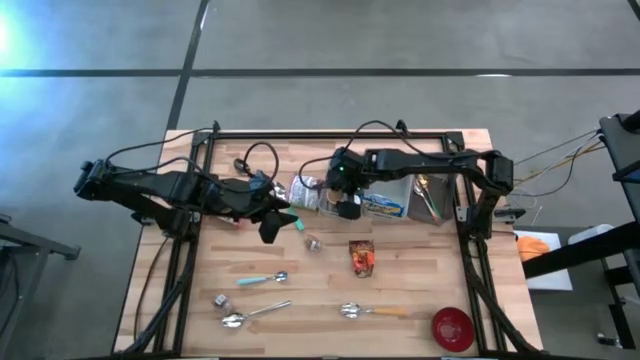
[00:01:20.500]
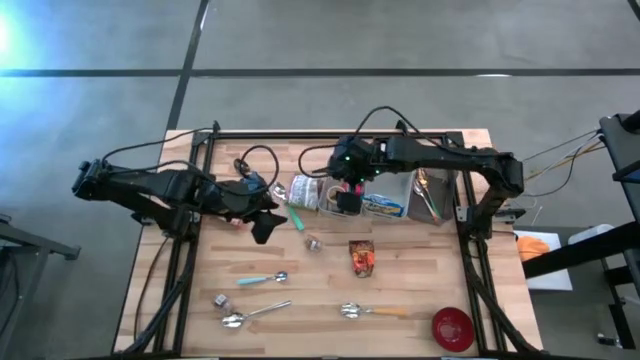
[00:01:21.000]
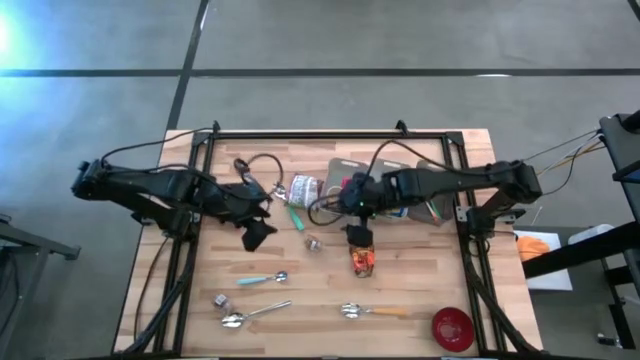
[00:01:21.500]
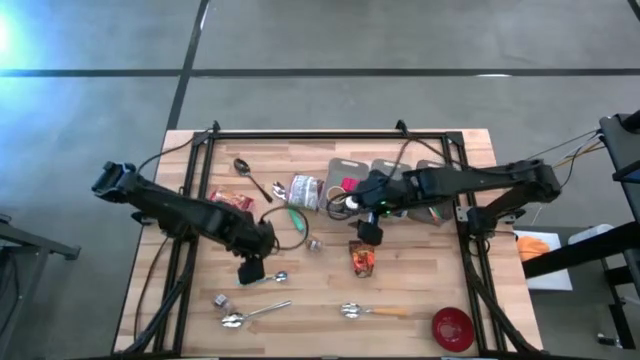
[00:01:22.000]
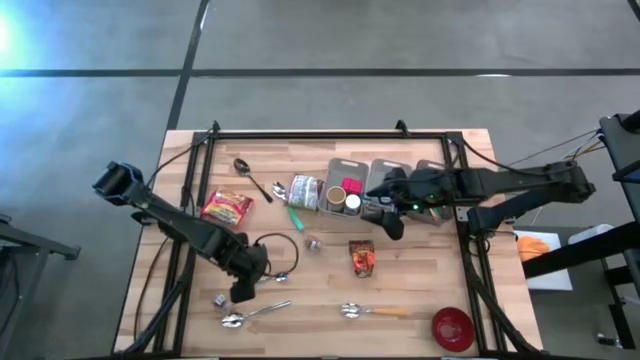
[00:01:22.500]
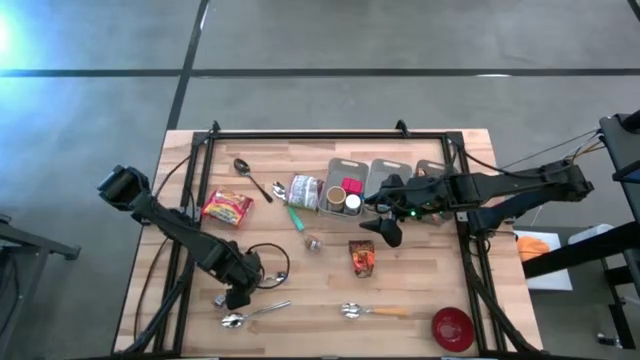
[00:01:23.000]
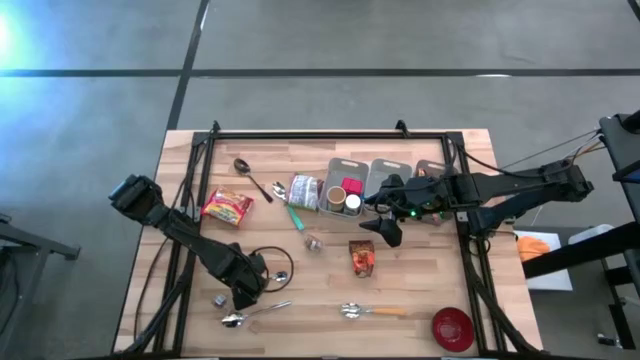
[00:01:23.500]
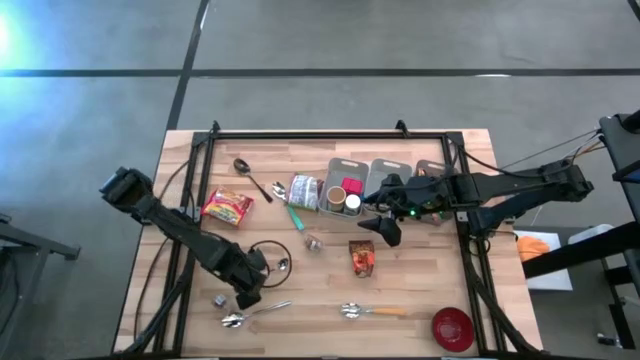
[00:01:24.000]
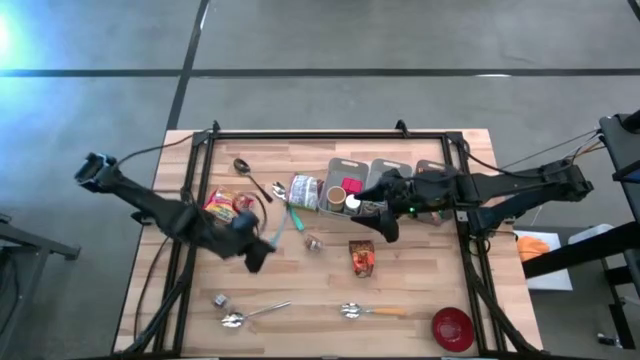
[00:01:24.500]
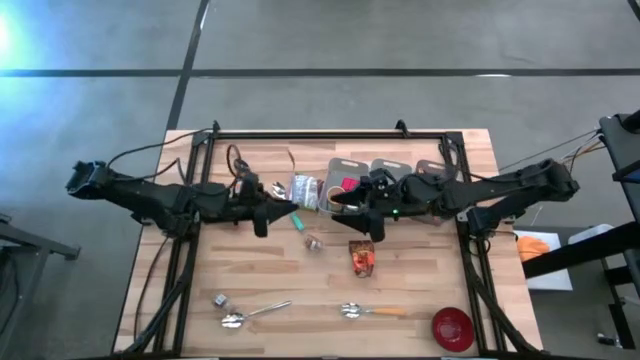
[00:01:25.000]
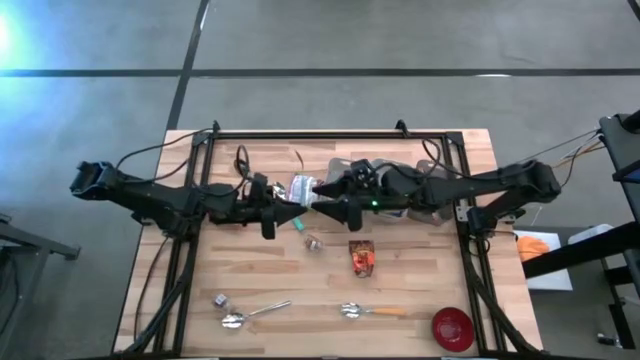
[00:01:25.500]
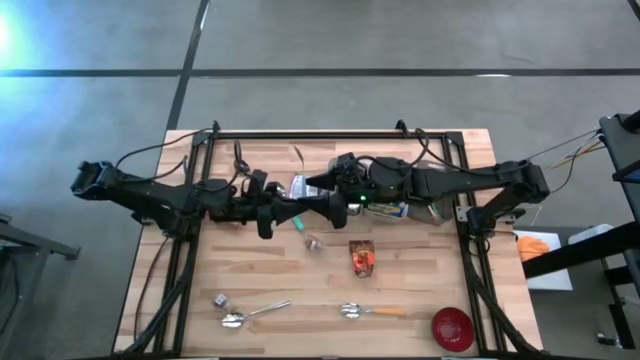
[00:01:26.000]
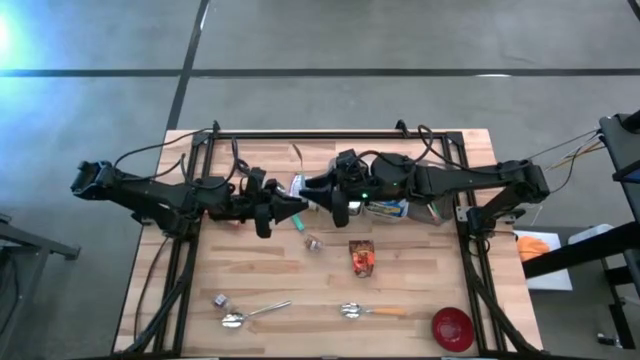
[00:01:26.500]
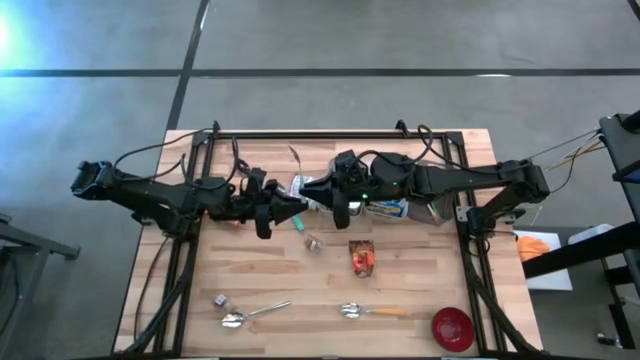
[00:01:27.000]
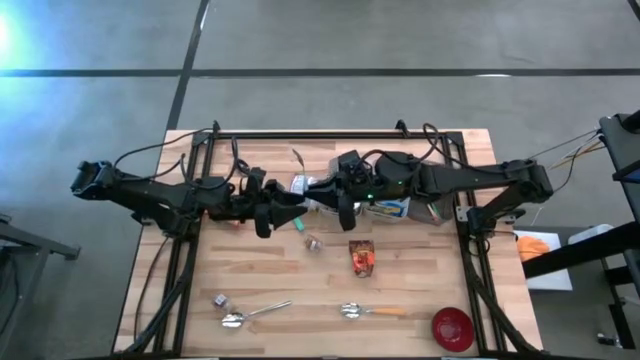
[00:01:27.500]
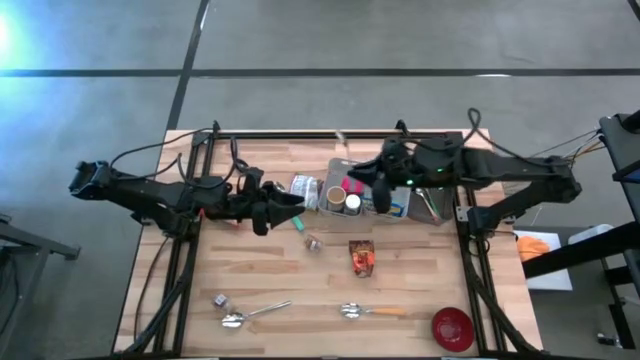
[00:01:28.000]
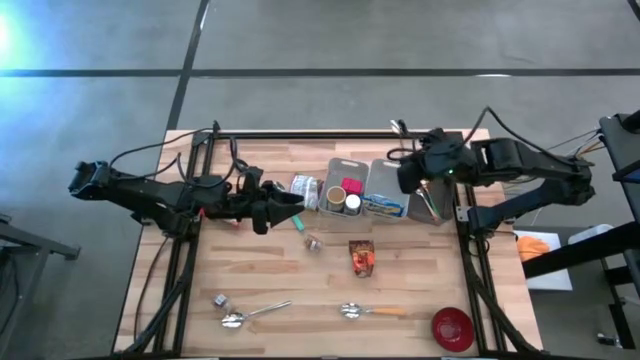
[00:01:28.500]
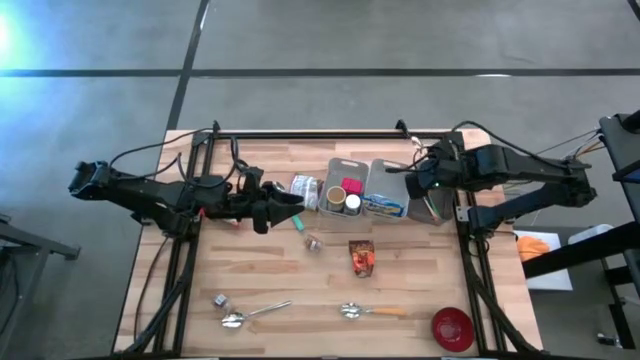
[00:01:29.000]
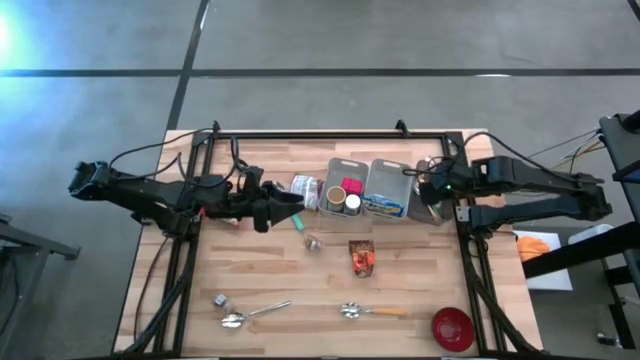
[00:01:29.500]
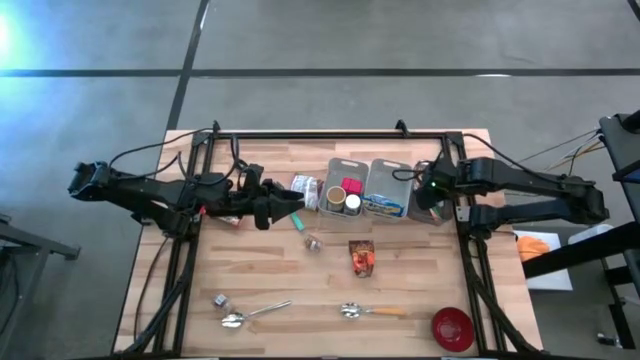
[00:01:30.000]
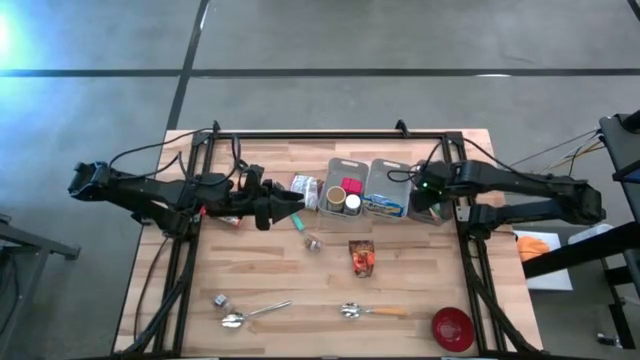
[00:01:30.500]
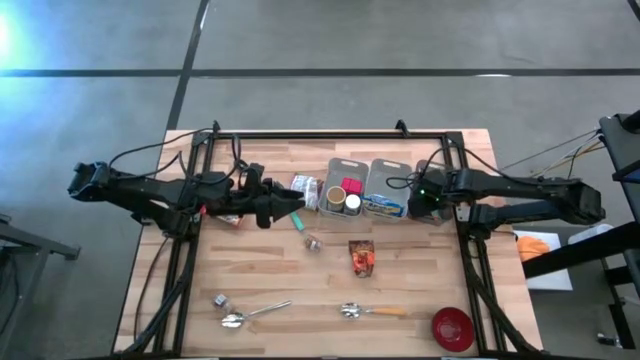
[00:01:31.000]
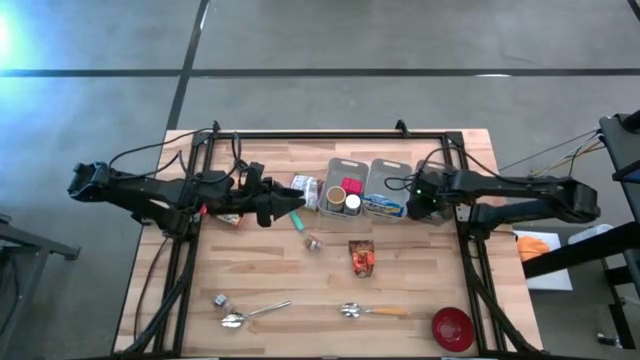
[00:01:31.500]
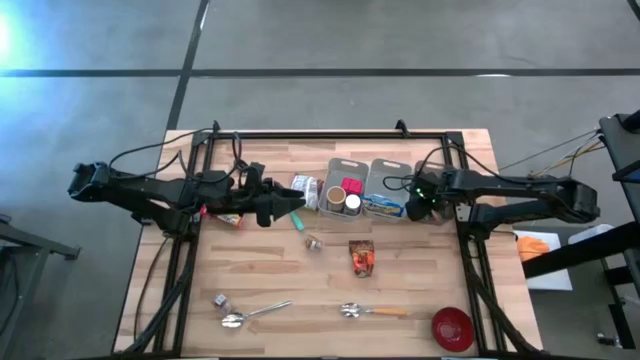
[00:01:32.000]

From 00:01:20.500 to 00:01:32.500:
Put the light blue spoon into the black bin
